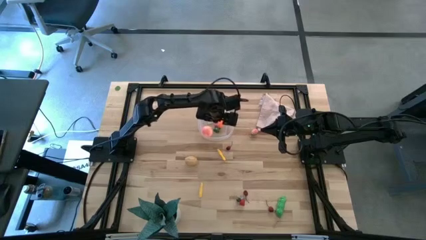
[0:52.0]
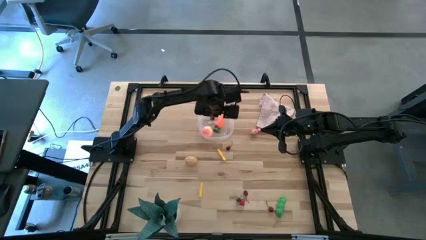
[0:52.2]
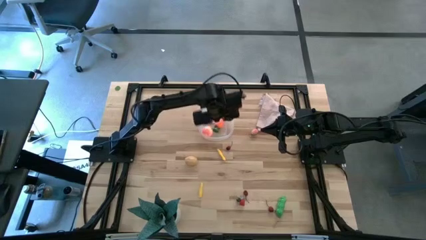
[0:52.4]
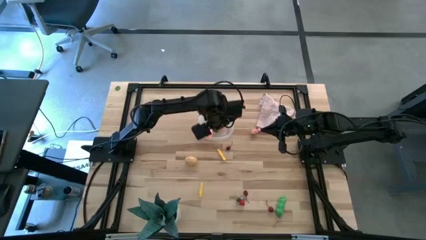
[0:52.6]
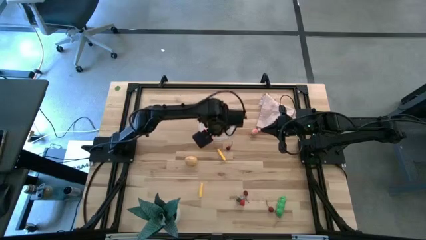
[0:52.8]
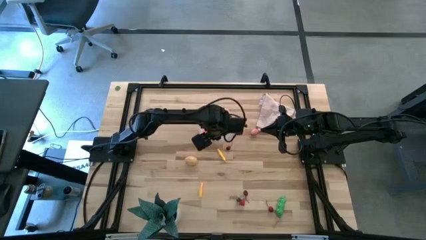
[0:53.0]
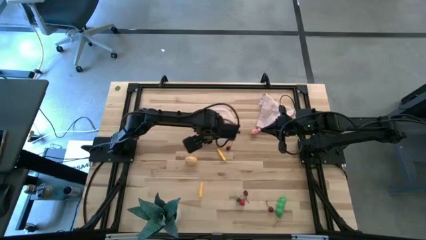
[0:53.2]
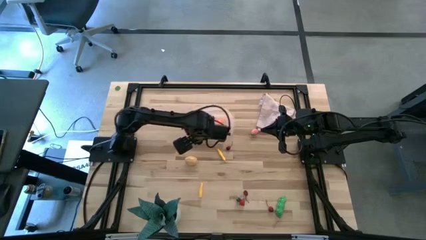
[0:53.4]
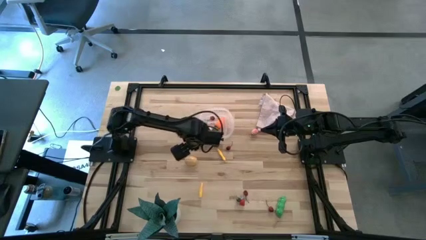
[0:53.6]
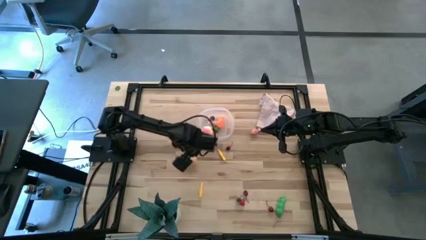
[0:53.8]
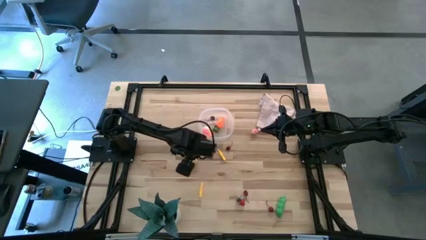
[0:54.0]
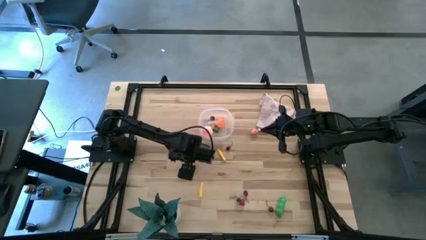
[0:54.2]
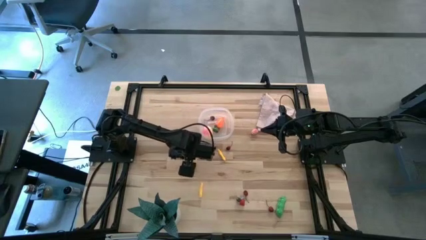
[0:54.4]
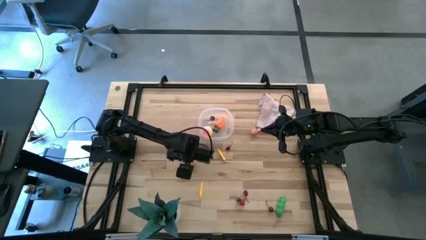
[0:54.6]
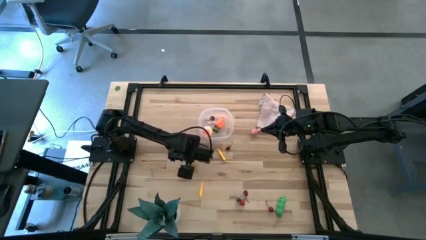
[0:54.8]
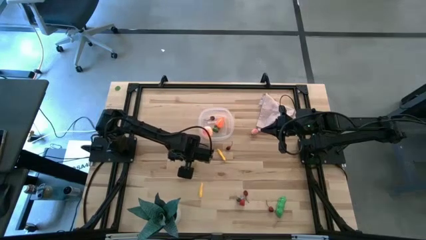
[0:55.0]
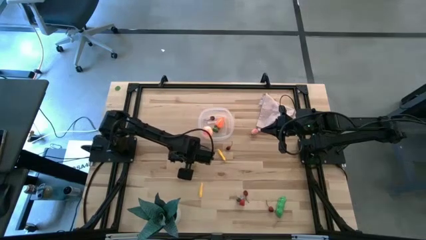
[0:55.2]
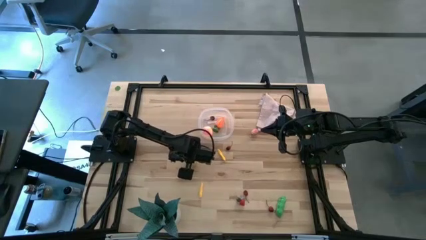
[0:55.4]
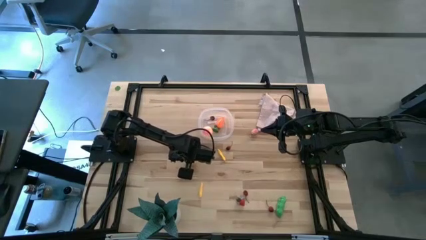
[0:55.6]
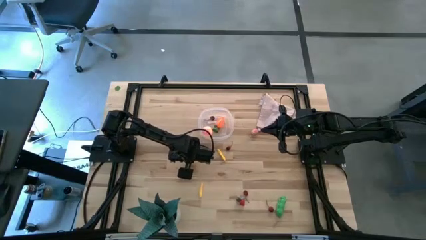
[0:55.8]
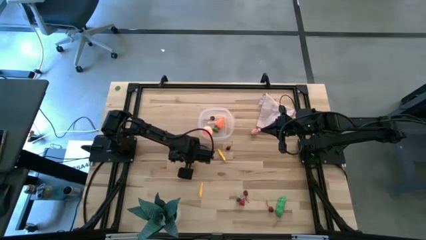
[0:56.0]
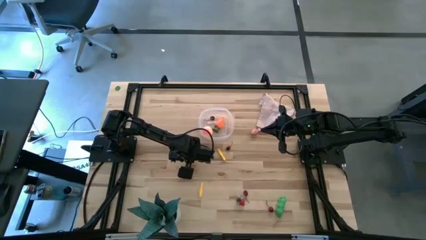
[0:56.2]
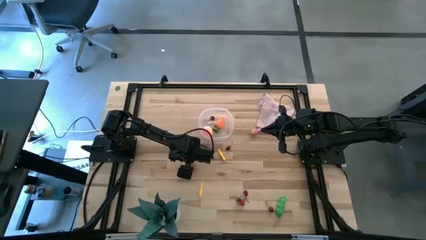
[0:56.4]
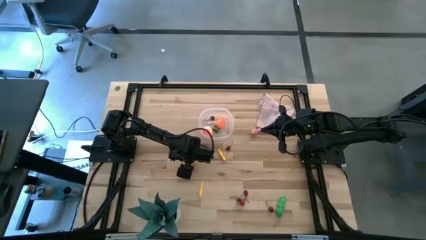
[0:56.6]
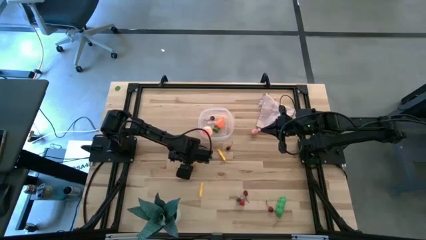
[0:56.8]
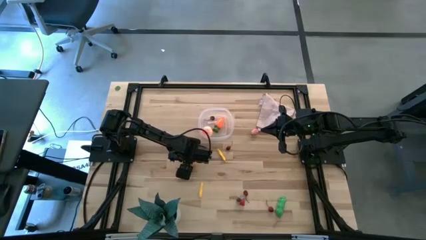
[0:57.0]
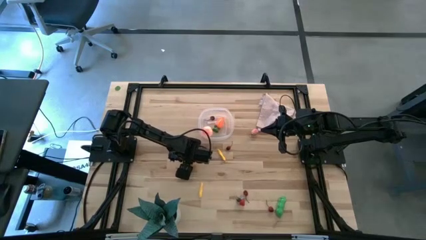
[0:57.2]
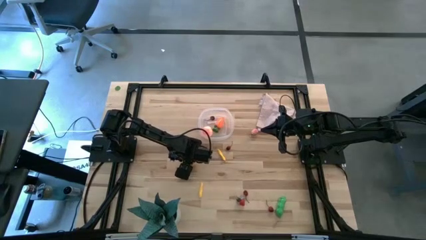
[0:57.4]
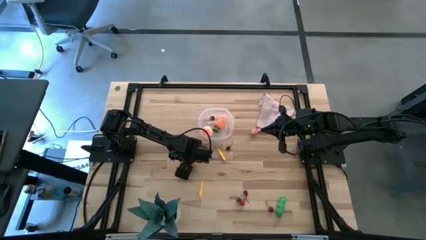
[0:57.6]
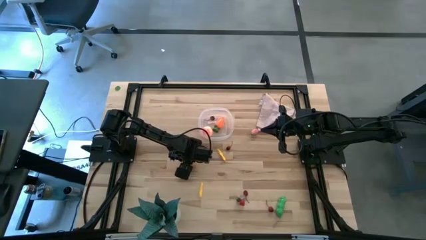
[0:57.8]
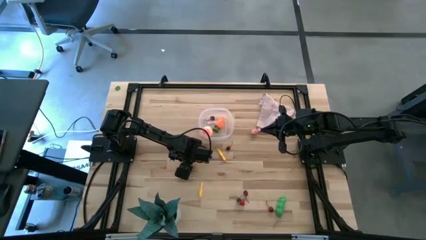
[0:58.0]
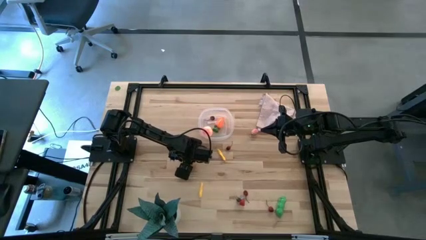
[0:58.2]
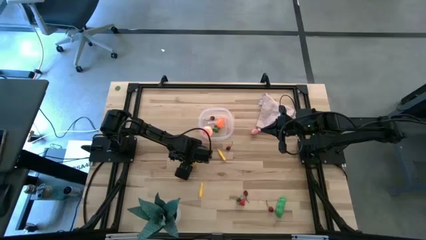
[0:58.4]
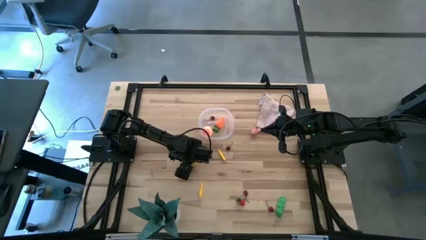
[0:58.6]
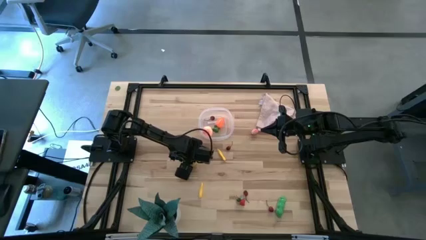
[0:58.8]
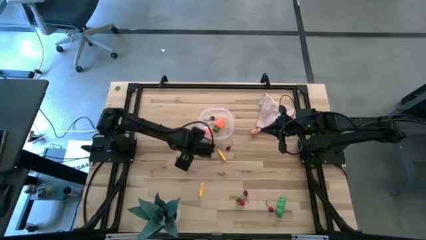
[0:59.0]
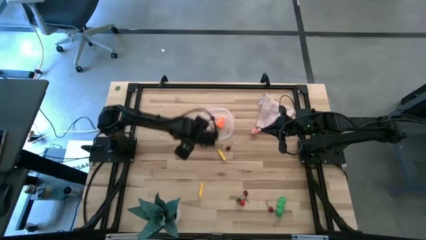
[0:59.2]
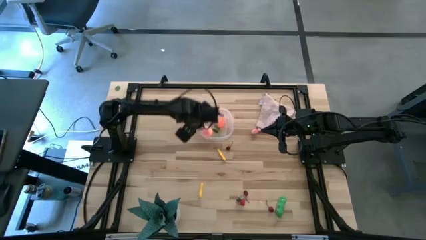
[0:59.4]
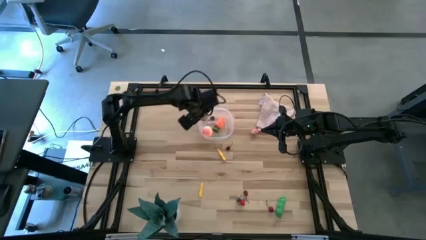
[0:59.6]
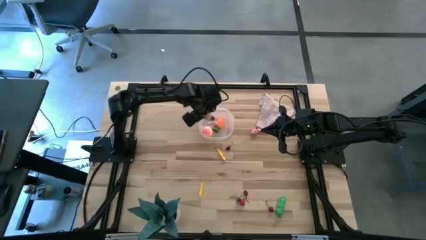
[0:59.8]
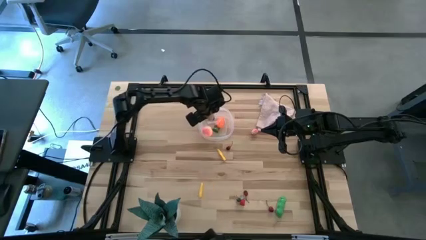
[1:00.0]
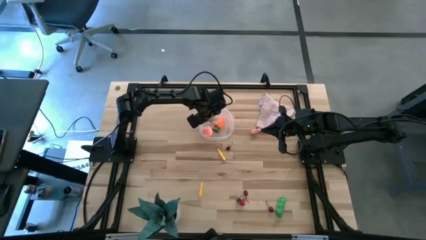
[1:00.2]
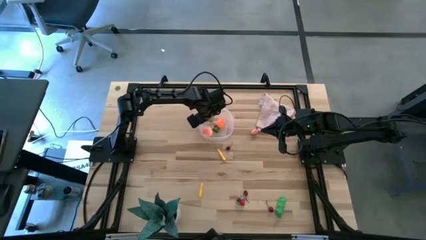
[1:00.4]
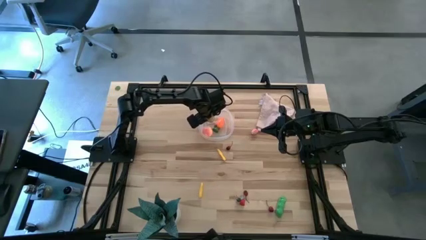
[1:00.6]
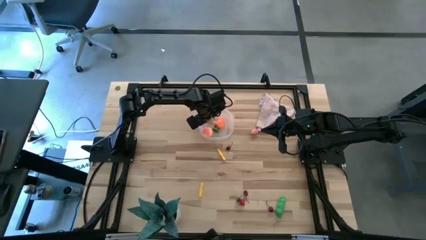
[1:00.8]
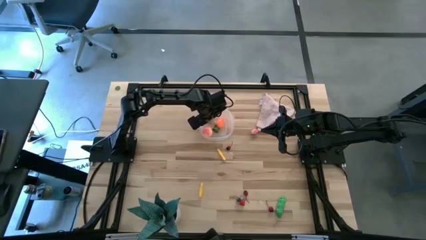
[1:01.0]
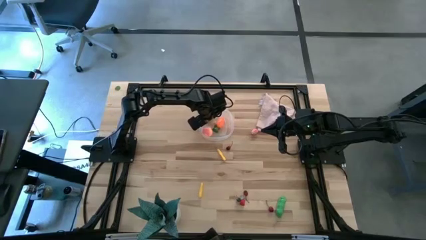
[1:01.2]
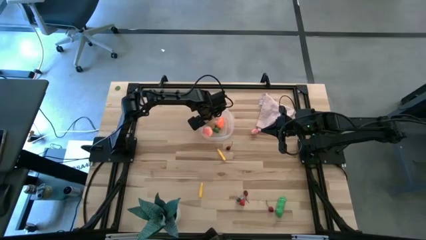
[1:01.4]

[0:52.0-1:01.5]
Task: Pick and placing Produce into tupperware
Put the brown potato into the transparent bin

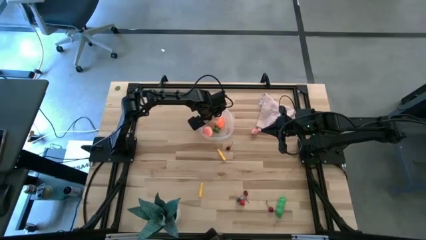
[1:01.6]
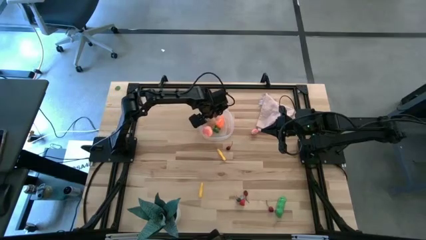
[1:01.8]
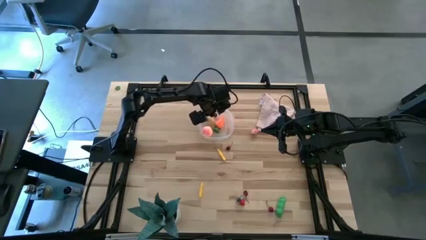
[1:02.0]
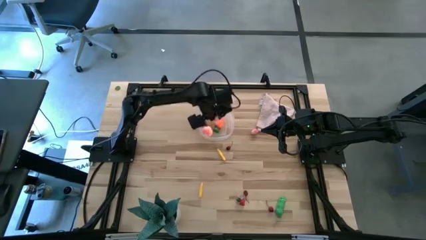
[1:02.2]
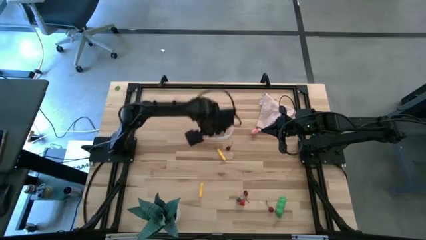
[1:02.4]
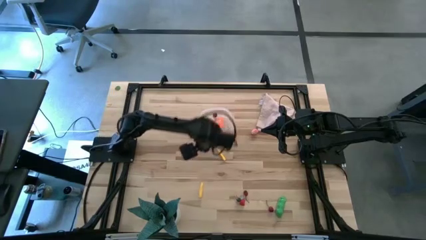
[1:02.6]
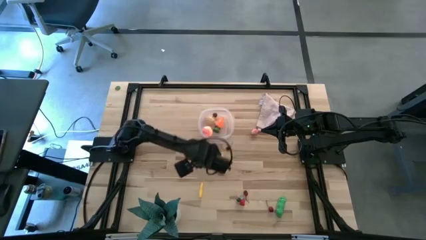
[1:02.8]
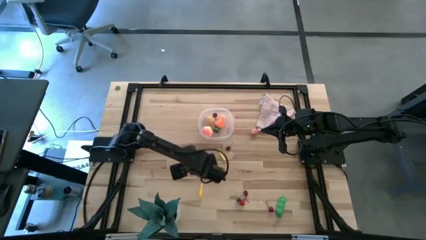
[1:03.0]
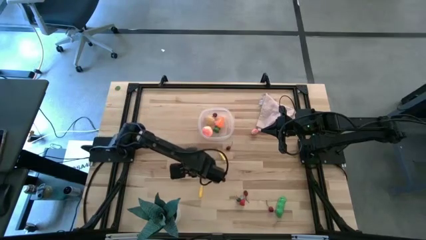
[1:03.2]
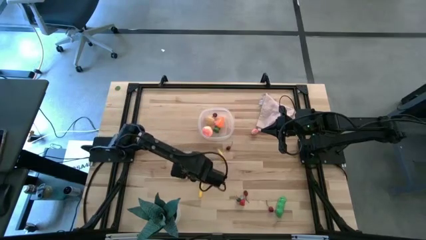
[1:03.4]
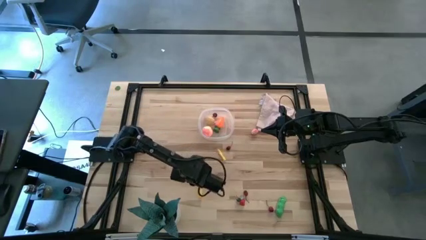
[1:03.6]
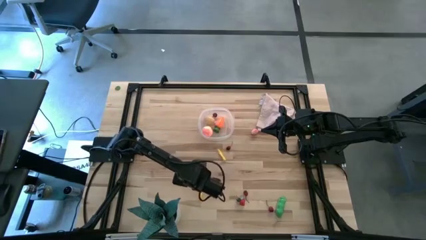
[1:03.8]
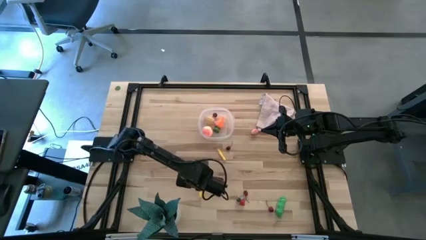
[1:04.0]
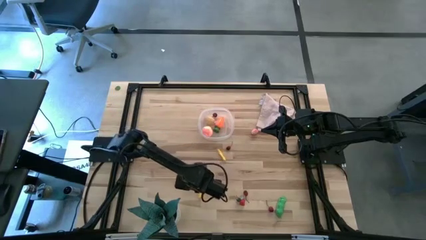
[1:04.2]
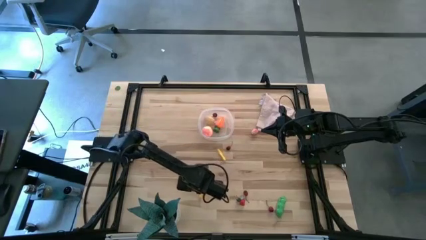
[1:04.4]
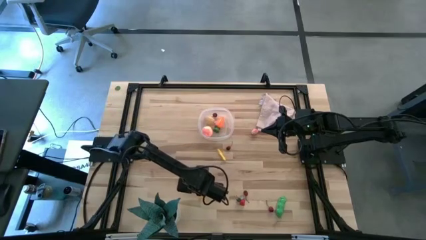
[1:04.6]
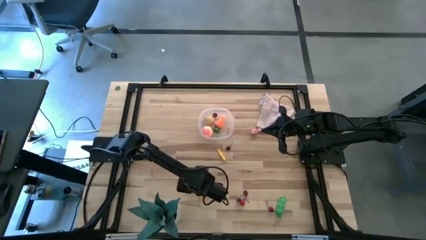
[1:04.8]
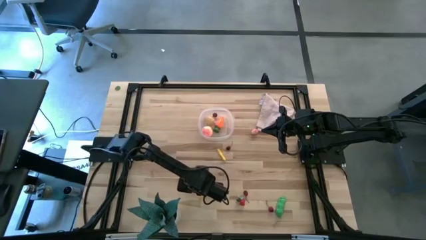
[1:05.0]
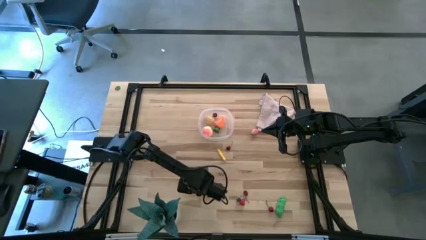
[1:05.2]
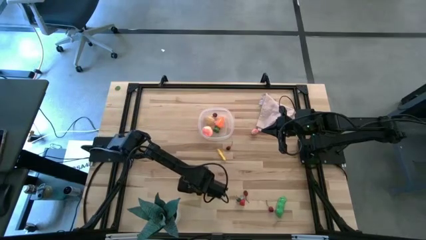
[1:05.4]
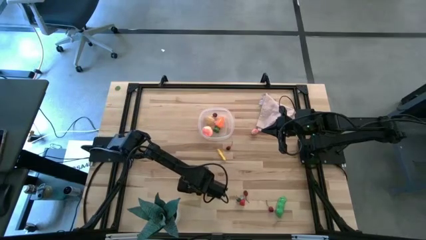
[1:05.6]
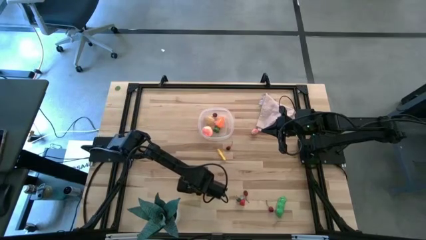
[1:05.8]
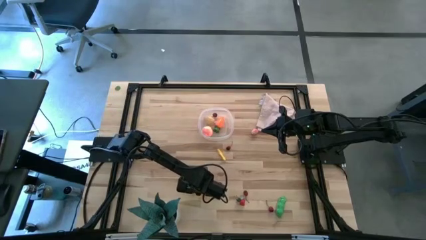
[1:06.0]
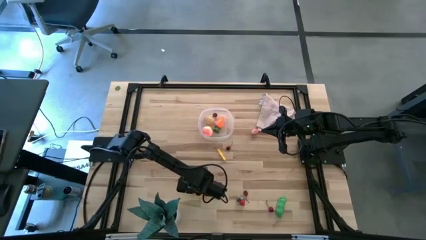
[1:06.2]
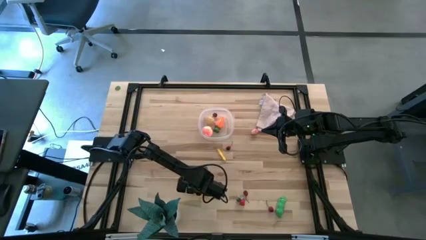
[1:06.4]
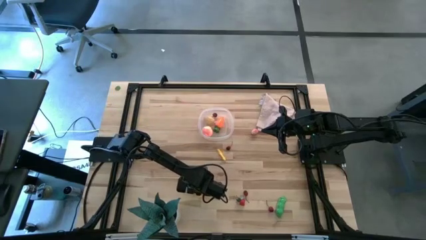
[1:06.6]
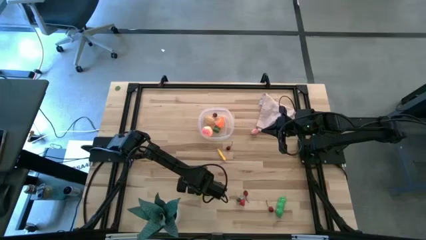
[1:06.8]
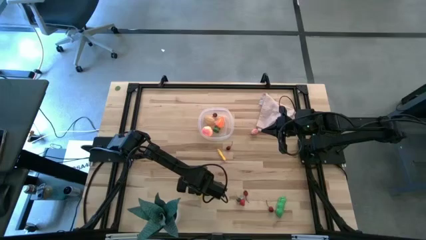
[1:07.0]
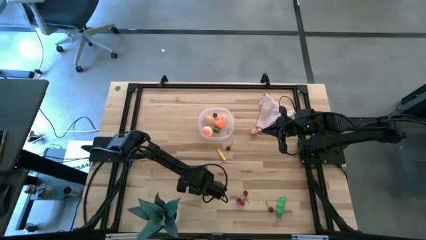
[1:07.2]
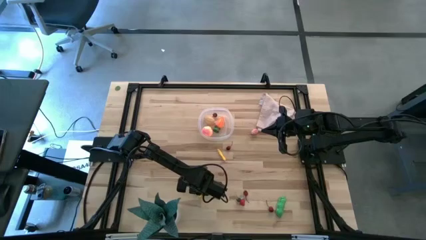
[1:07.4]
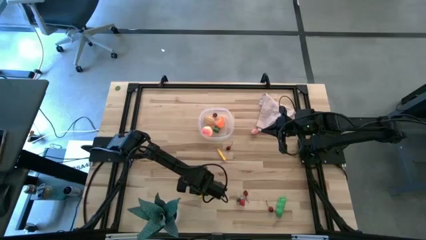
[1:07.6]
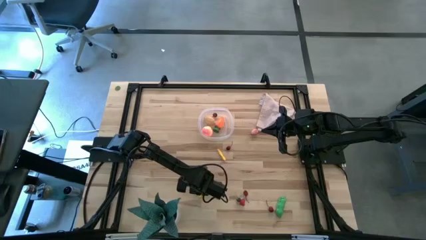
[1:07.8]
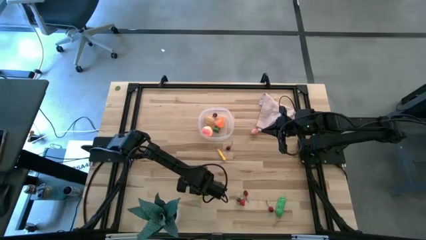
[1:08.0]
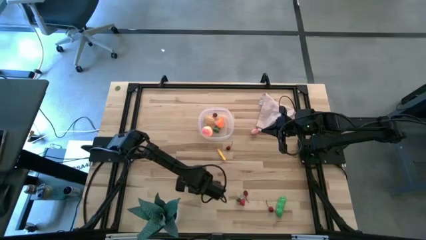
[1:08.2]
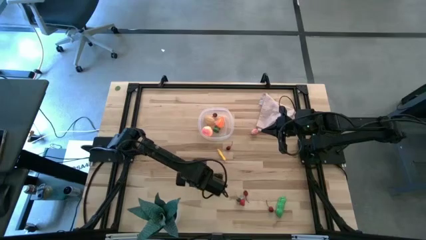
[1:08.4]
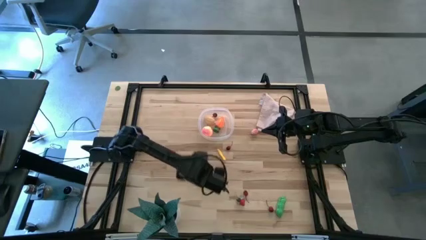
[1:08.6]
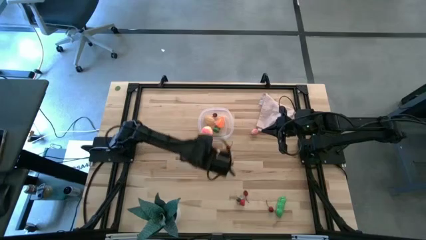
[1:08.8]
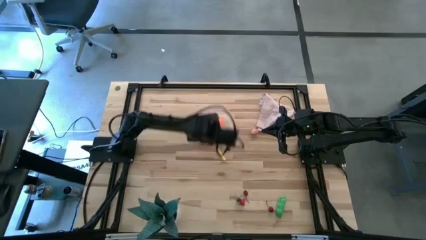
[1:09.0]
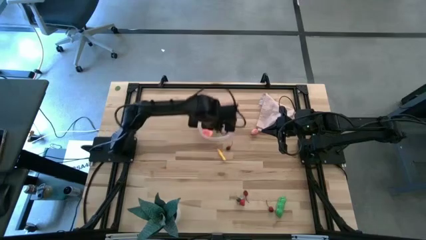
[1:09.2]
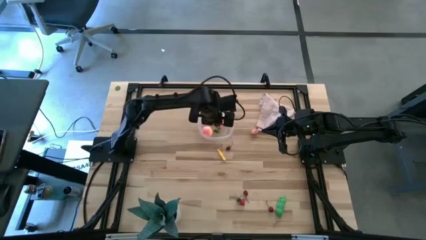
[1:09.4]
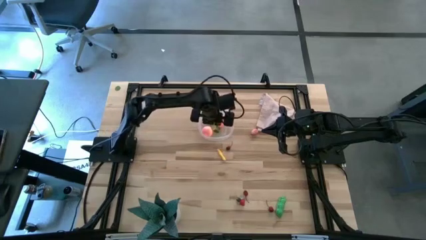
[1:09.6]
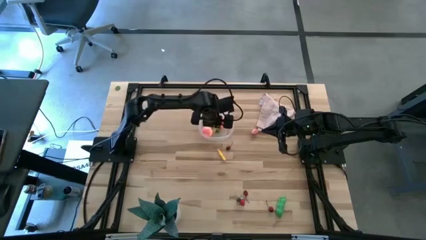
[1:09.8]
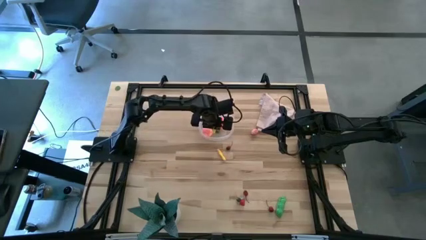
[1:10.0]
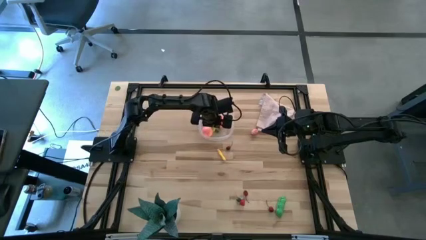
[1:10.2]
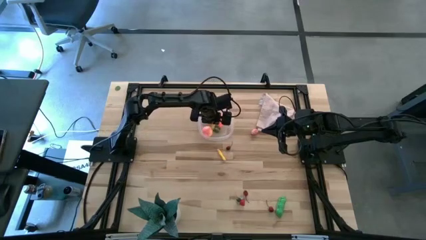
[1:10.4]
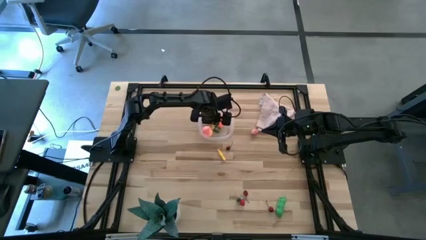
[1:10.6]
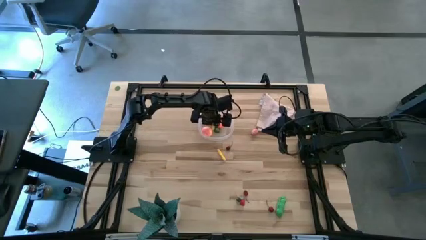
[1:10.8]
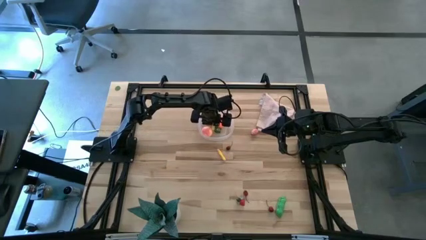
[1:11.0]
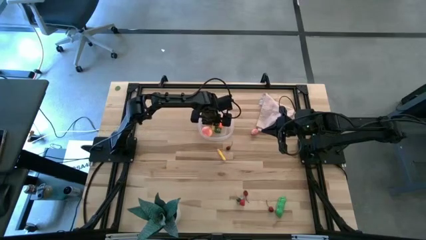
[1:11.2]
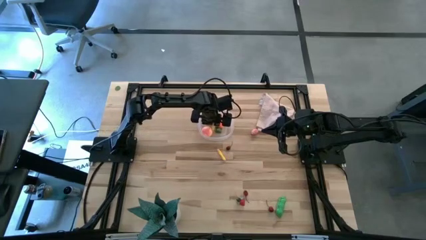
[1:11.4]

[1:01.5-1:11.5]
Put the yellow corn into the transparent bin
